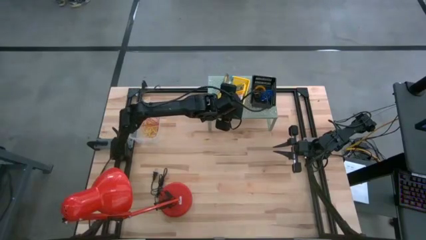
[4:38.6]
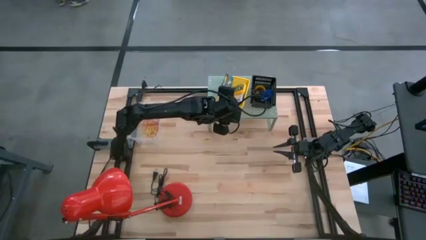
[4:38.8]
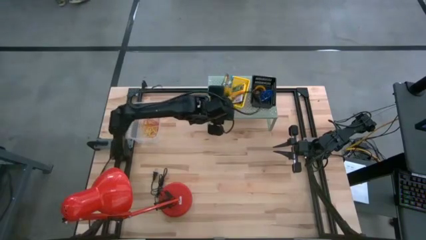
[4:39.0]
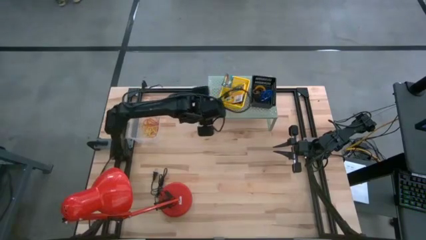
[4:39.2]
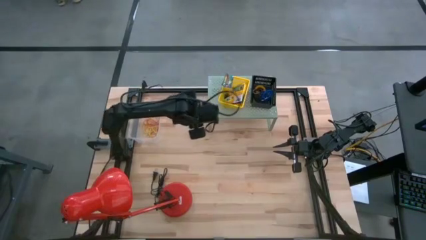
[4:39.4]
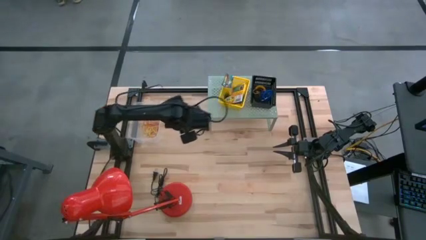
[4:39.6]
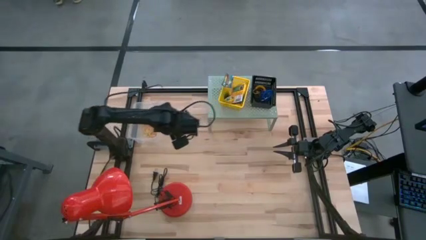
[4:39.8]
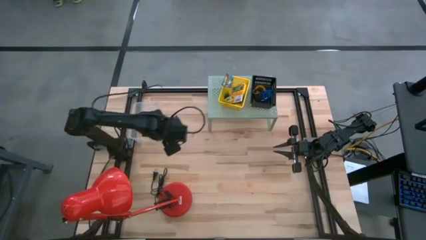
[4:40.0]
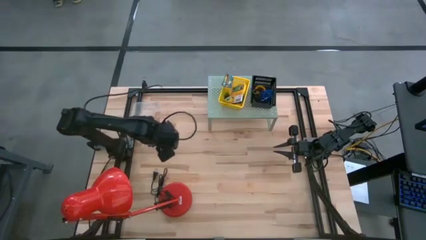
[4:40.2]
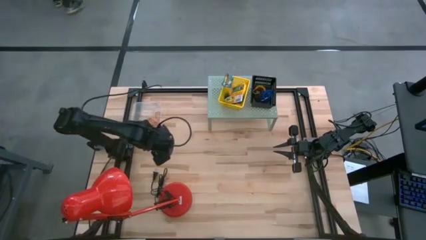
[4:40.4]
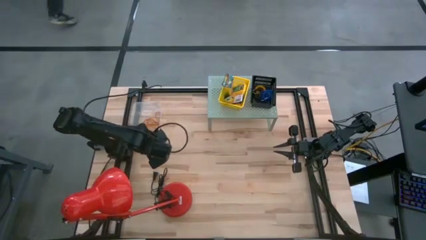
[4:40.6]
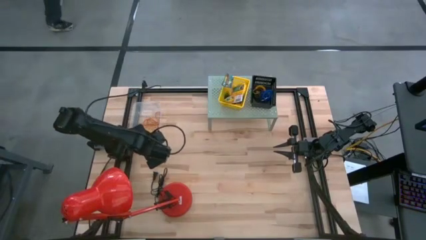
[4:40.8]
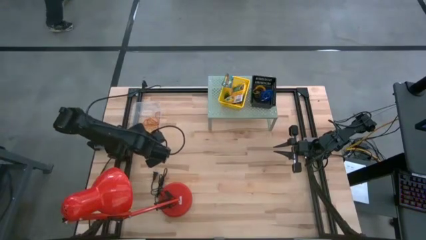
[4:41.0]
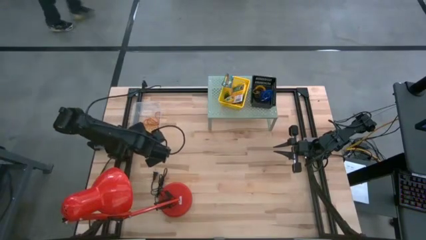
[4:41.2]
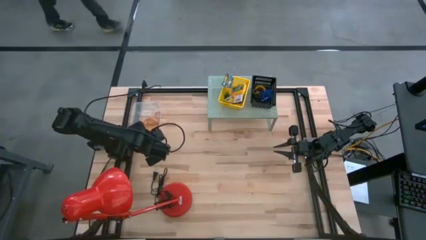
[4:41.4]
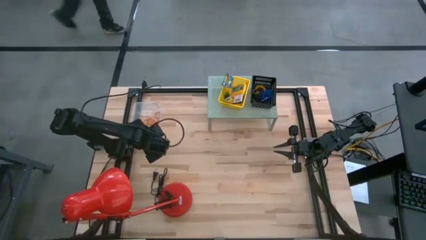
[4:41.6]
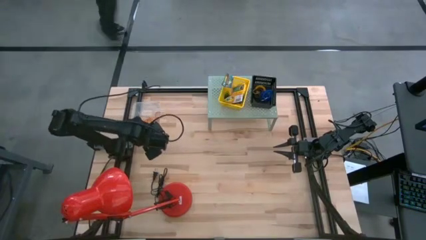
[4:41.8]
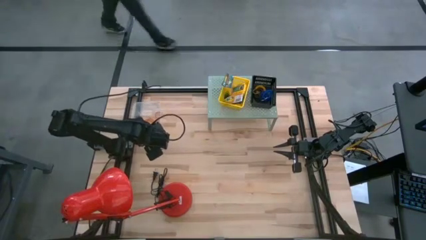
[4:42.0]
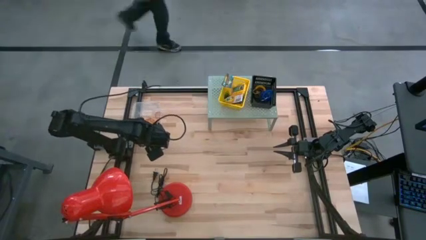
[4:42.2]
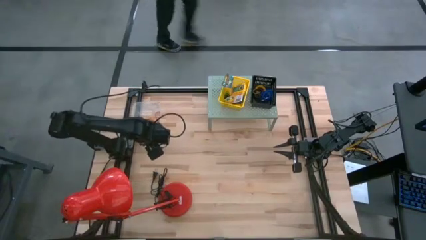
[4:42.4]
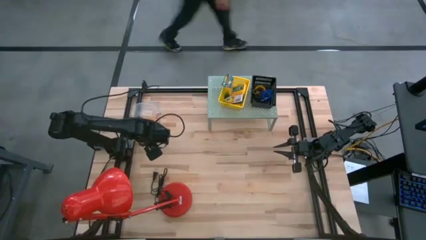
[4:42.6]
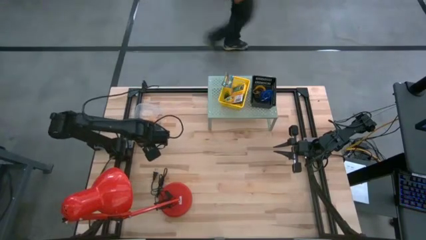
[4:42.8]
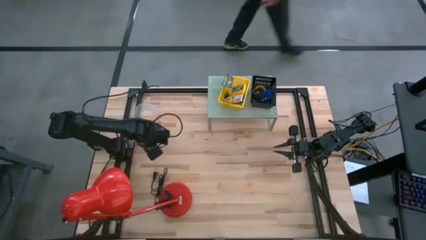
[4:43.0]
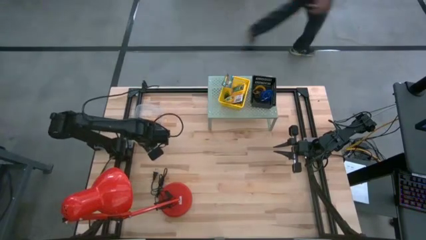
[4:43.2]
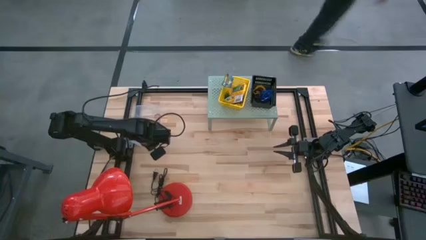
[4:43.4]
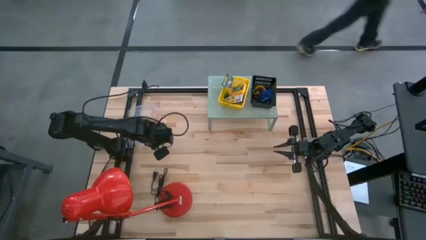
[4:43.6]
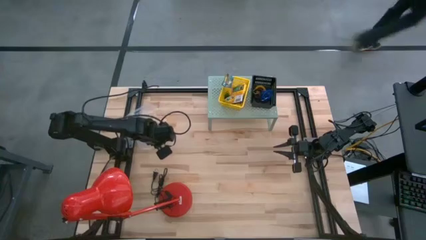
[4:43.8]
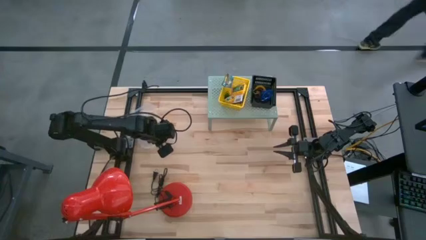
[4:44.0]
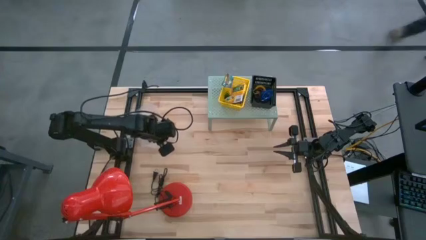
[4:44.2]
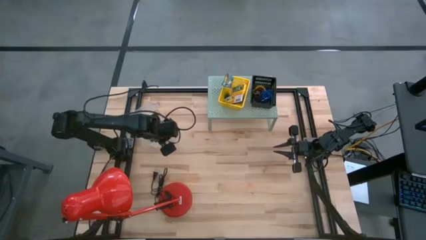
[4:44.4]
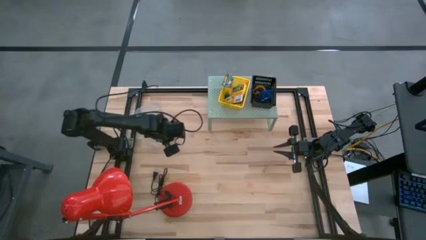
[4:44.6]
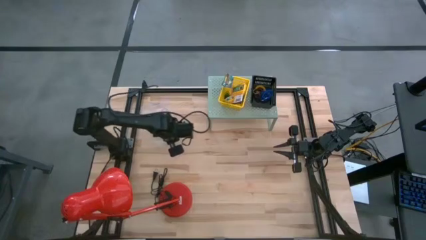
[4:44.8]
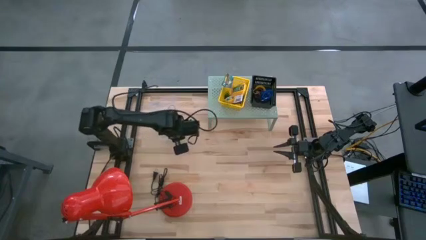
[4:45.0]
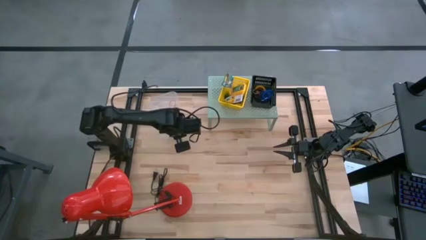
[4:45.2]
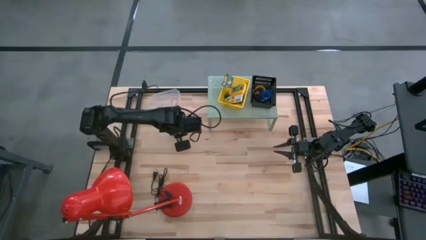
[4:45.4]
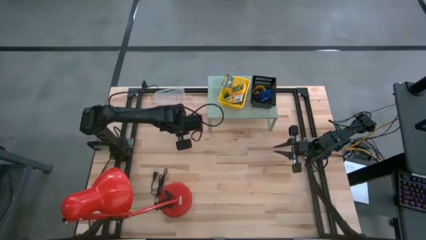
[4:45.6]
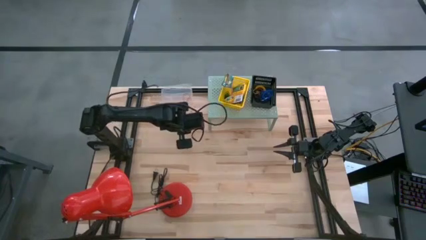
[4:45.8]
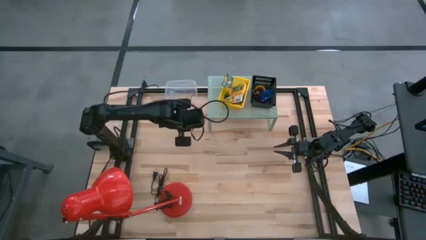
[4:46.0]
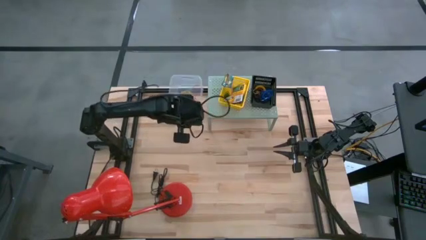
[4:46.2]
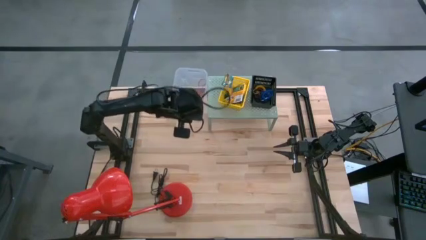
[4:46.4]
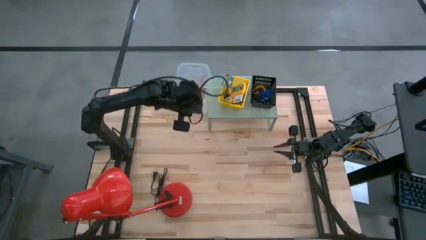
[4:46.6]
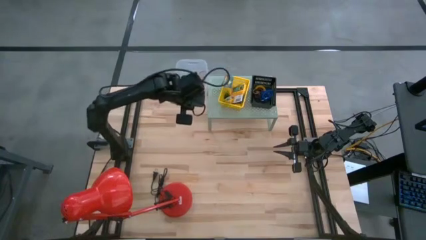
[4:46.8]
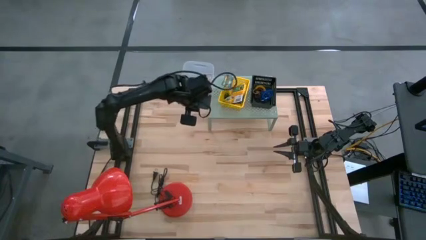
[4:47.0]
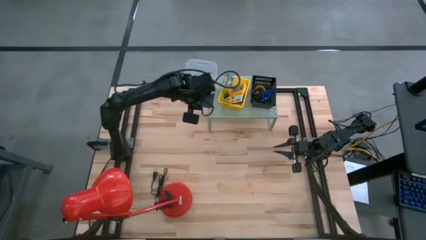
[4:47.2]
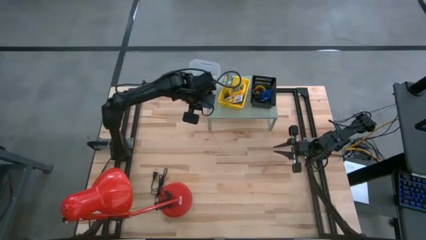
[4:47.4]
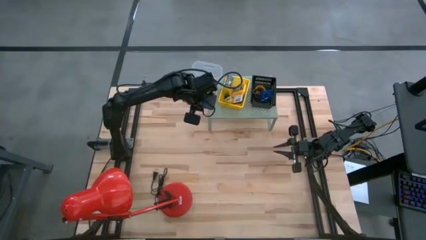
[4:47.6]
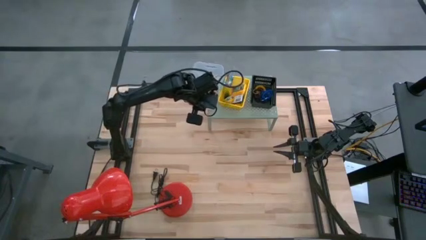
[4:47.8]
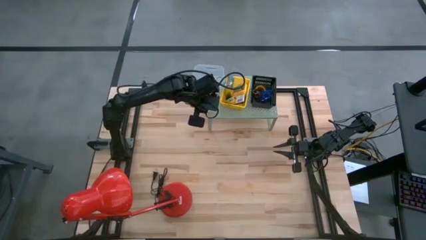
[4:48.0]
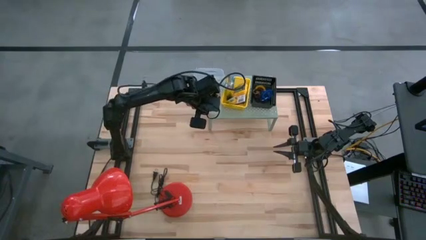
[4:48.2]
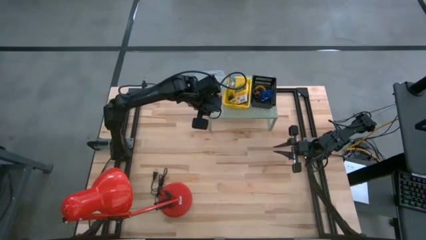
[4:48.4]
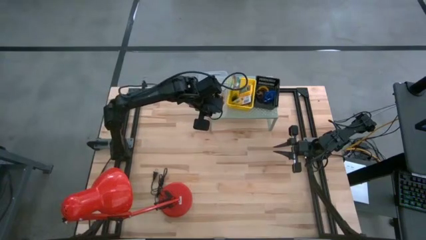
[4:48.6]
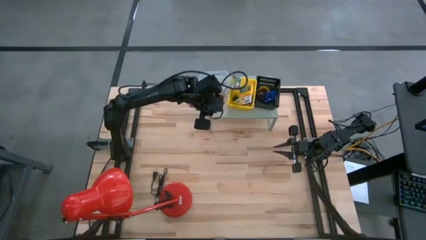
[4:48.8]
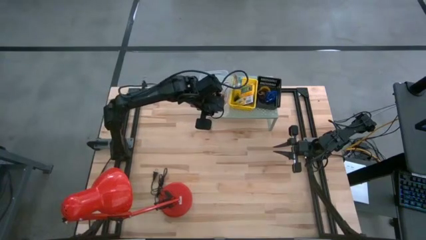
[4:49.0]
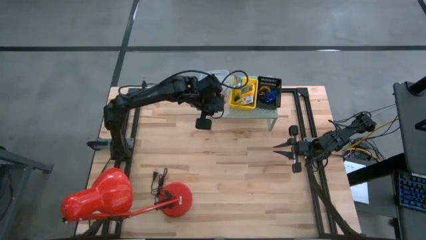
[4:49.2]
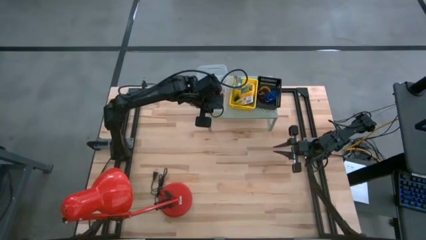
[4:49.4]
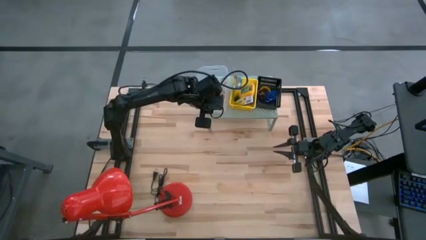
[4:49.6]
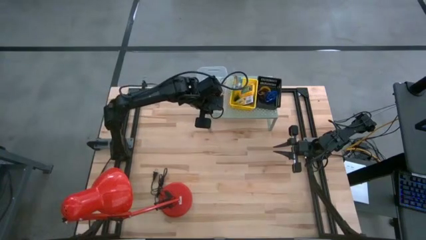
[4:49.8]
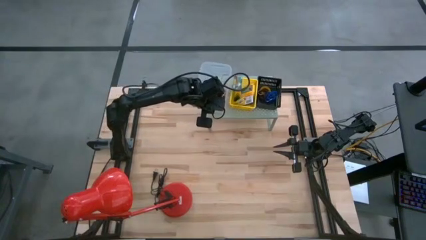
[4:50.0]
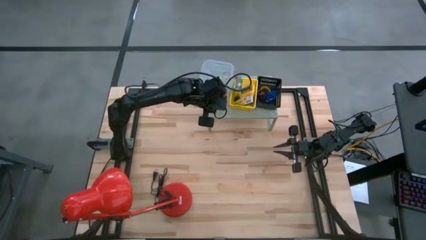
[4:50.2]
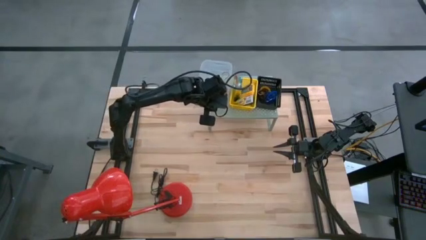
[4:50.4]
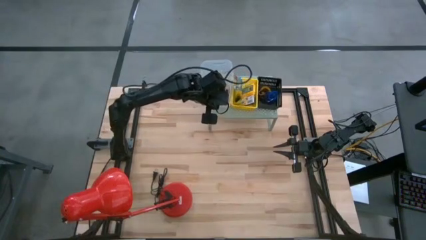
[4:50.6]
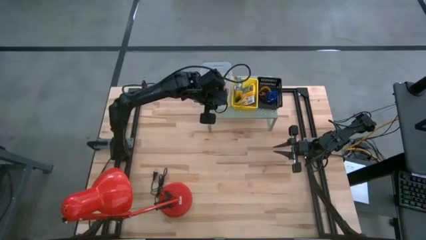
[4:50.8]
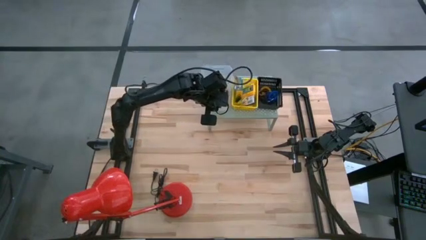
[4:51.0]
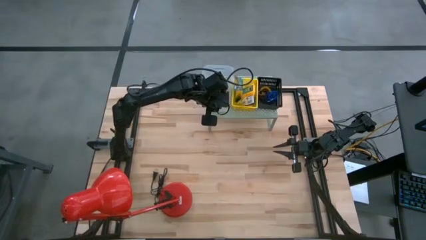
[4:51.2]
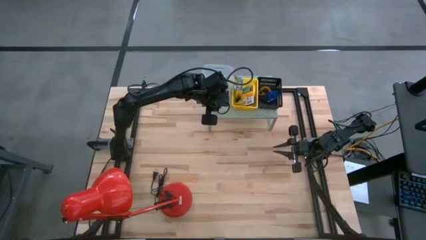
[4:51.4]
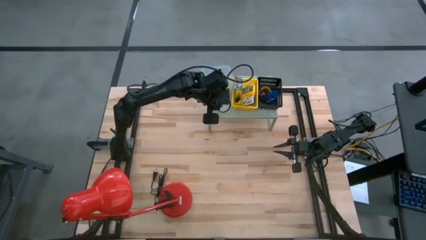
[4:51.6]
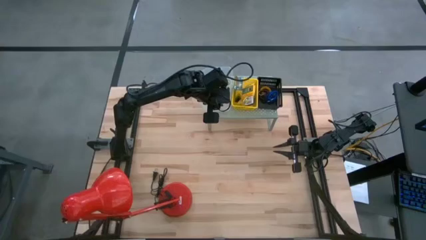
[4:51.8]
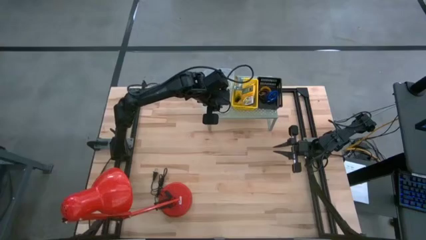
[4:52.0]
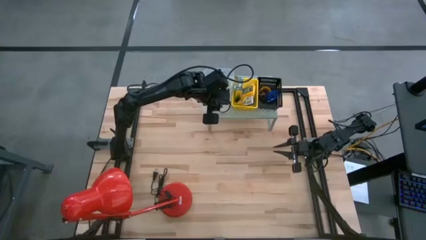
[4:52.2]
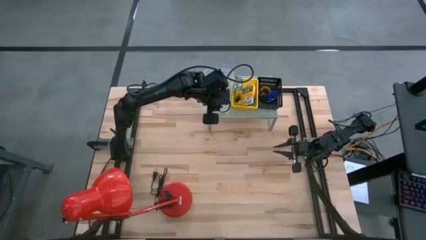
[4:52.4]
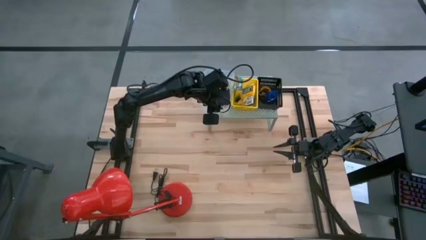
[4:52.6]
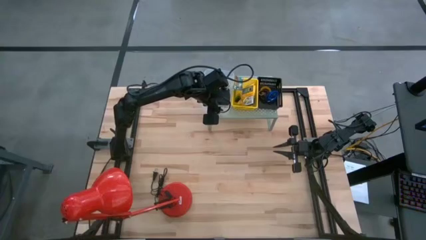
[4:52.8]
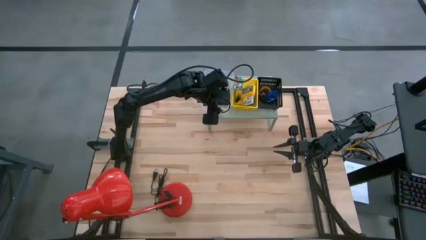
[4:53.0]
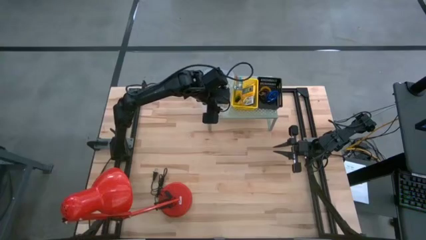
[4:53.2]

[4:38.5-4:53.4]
Task: Pick & Place Office Desk Supplies
Put the transparent bin with the rubber bands on the shelf
